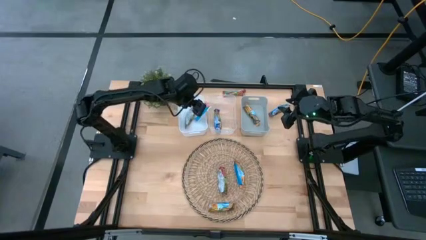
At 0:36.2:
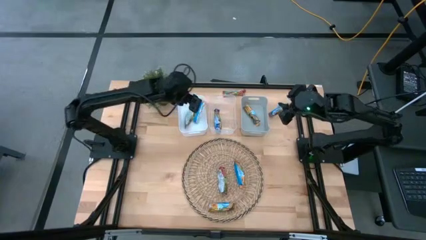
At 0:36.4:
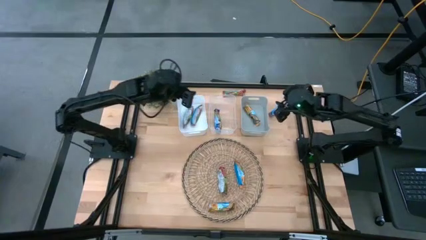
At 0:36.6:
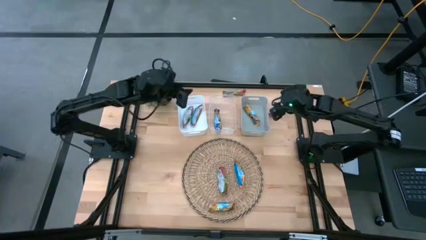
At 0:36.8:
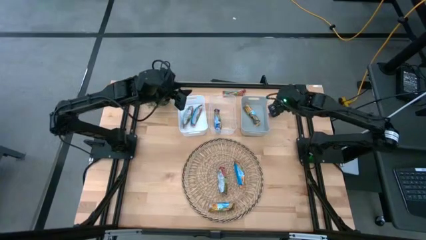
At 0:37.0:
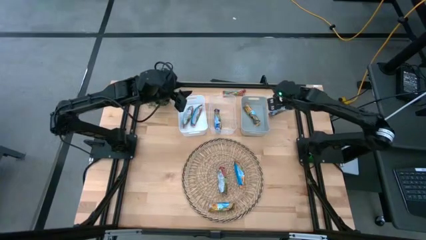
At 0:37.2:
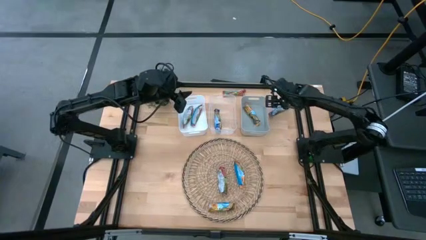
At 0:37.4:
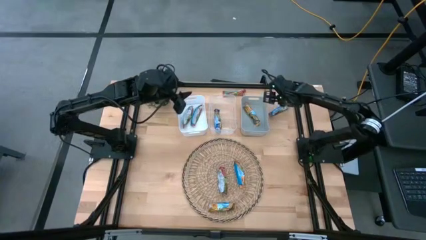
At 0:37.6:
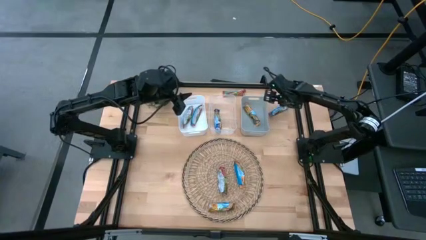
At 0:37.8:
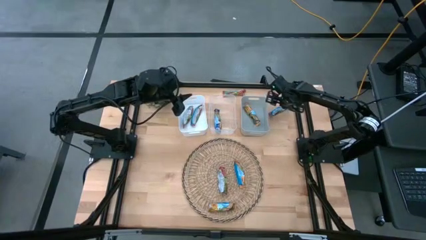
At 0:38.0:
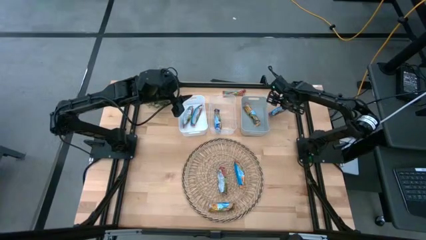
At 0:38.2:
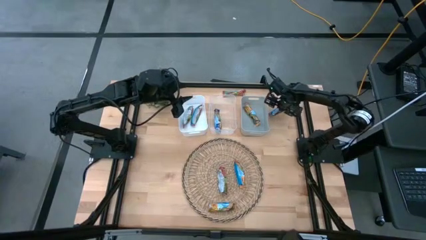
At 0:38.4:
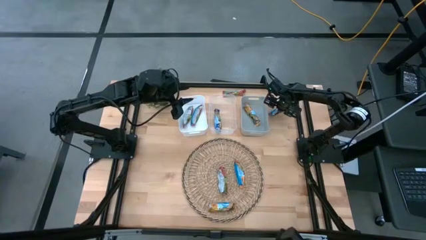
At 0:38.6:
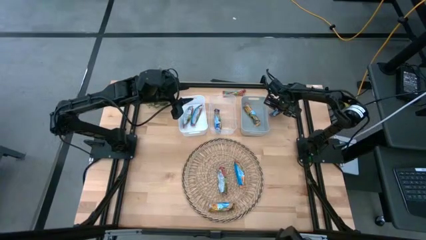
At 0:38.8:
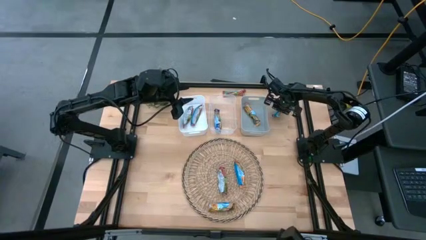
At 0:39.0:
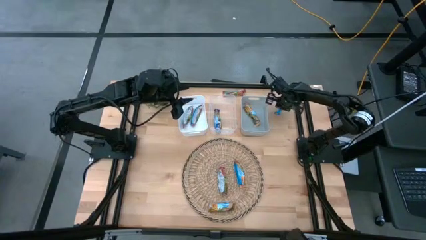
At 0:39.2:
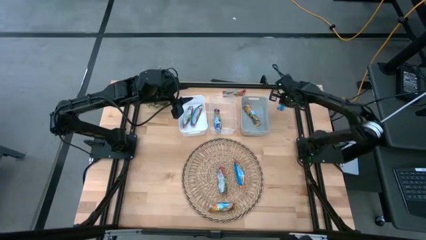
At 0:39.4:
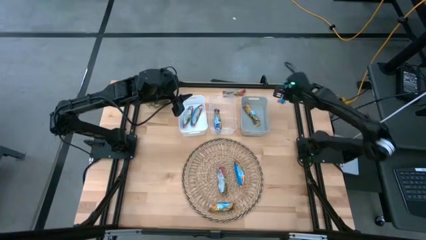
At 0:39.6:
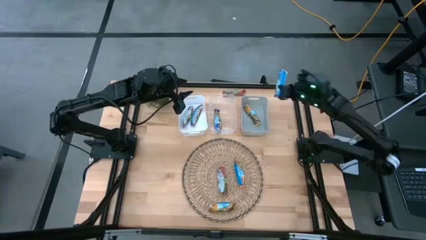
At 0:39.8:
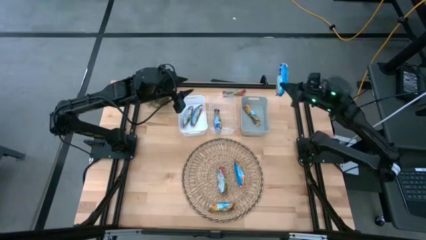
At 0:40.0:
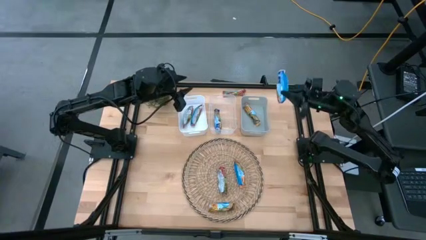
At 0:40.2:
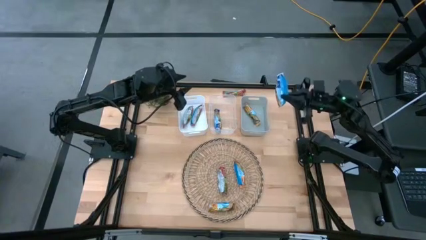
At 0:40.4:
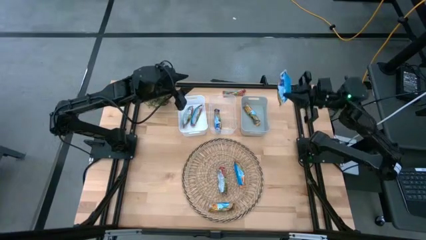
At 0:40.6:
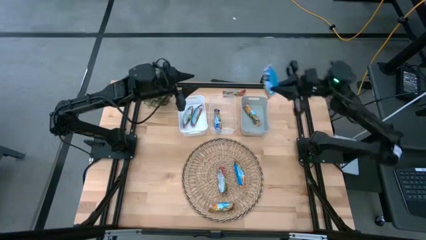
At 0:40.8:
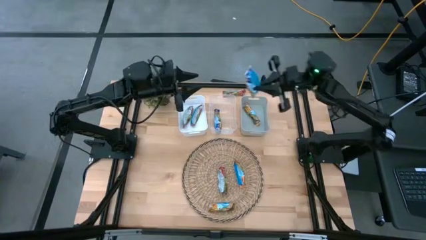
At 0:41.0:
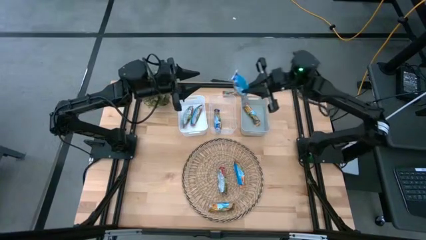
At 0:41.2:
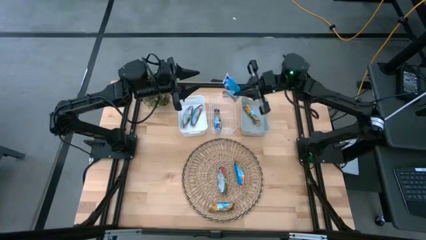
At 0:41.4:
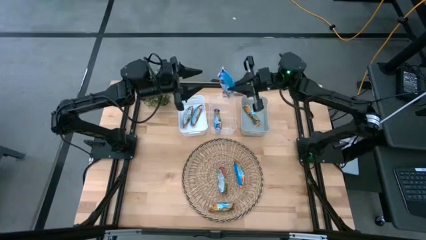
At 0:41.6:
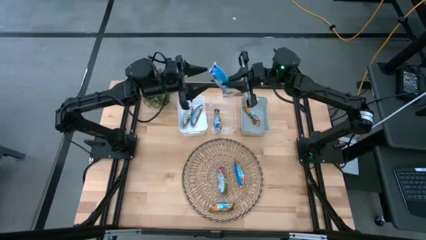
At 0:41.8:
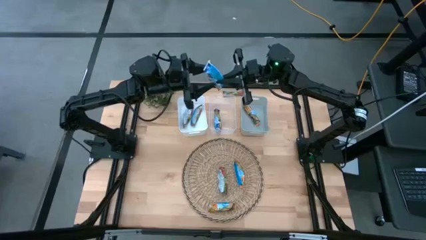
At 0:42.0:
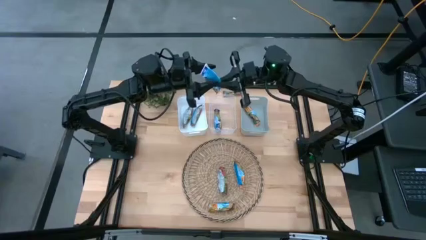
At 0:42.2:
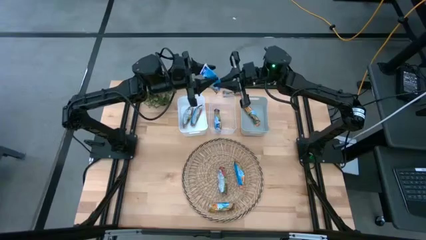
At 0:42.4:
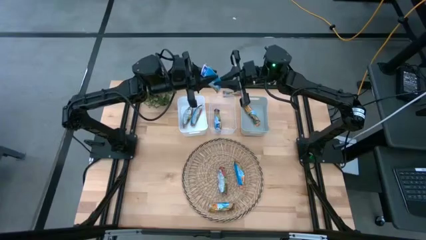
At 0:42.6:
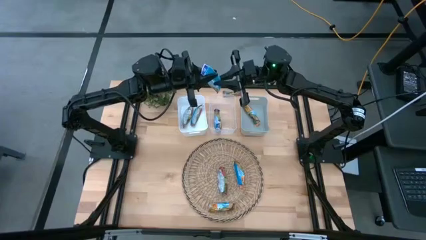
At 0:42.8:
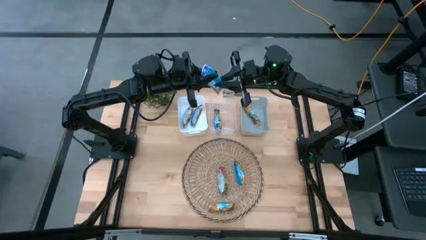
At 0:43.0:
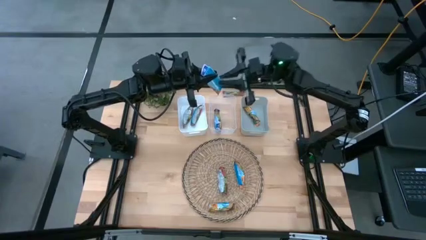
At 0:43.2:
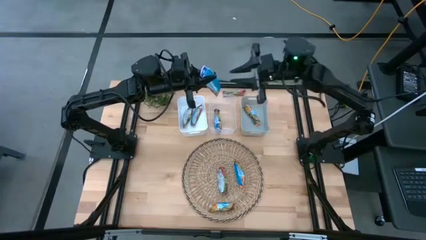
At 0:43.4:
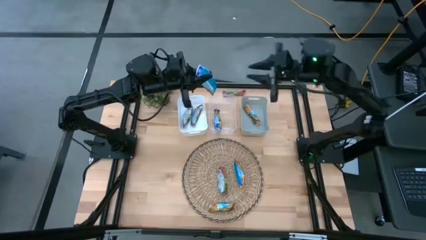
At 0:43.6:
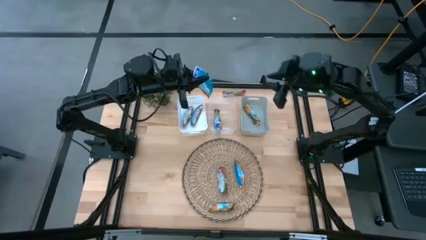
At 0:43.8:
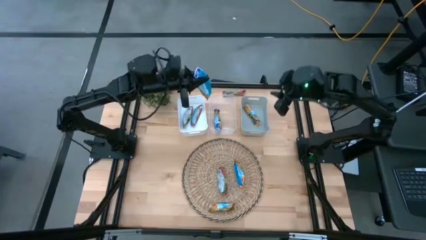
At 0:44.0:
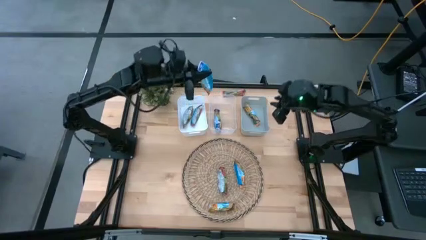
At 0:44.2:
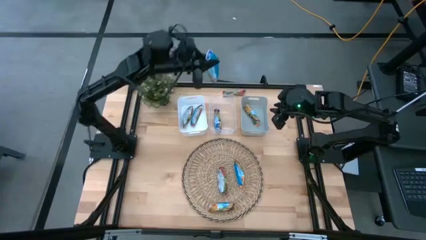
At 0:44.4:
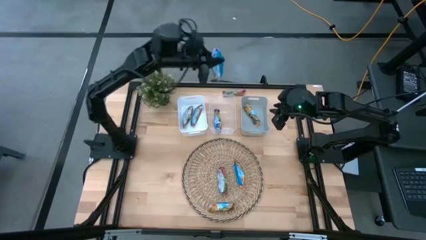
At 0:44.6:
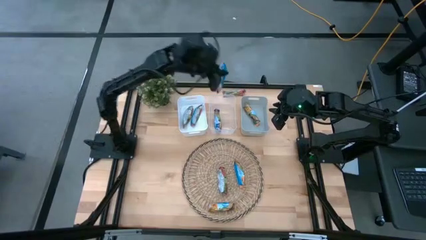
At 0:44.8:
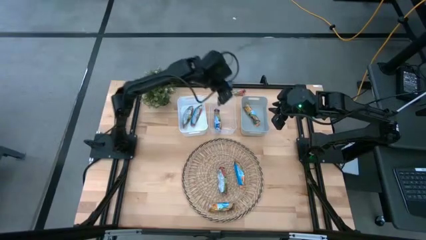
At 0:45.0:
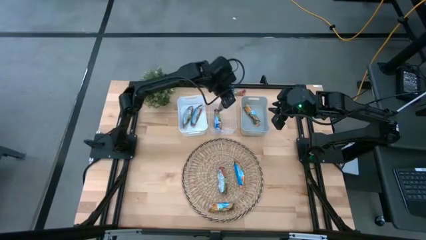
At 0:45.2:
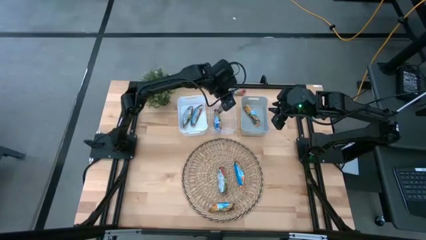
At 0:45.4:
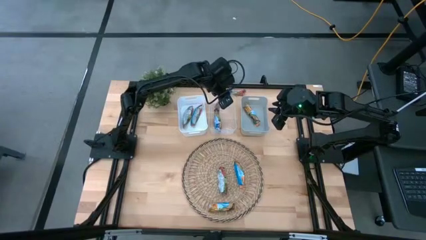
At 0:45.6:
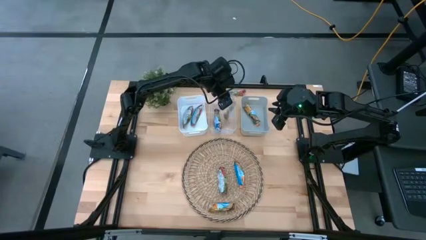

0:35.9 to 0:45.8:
Task: Pick and place Granola Bars by type
Put the blue granola bar into the transparent bin

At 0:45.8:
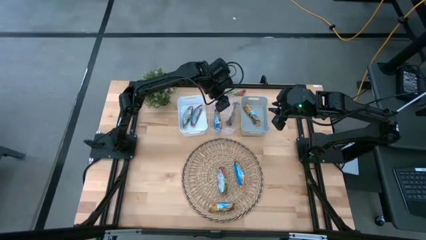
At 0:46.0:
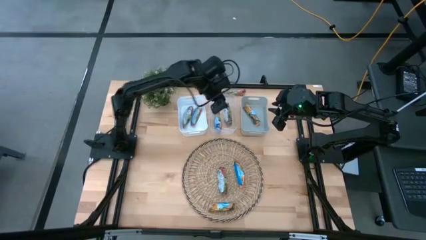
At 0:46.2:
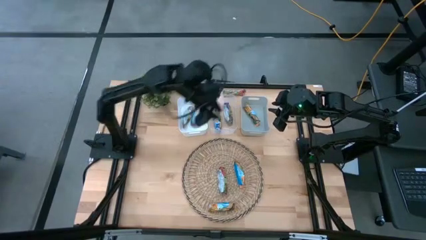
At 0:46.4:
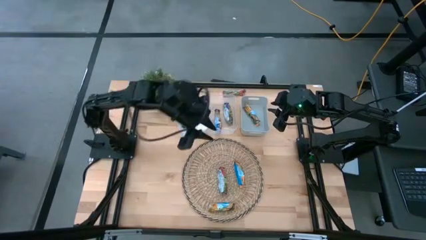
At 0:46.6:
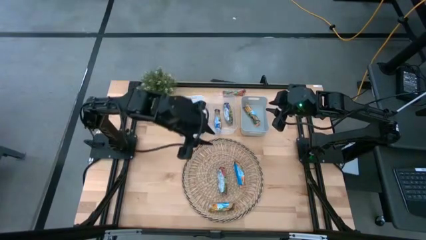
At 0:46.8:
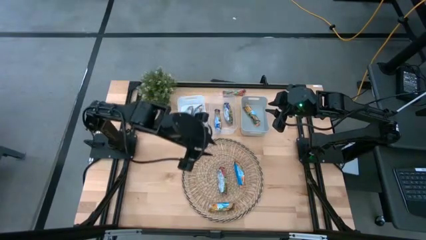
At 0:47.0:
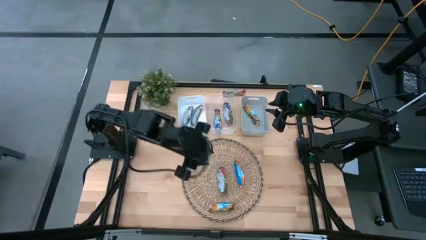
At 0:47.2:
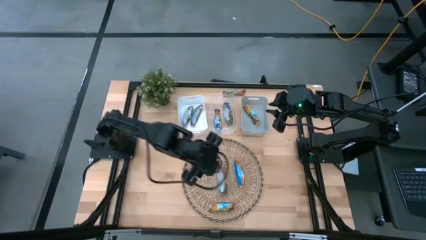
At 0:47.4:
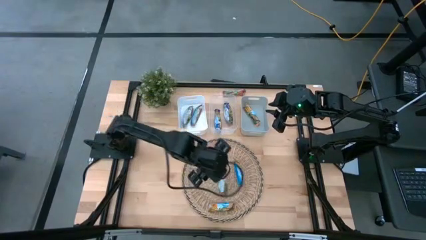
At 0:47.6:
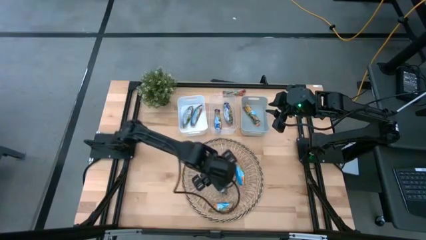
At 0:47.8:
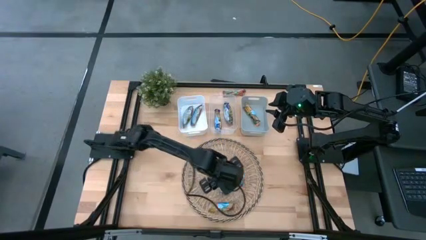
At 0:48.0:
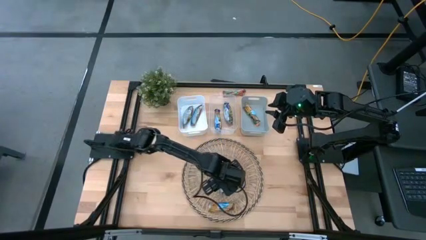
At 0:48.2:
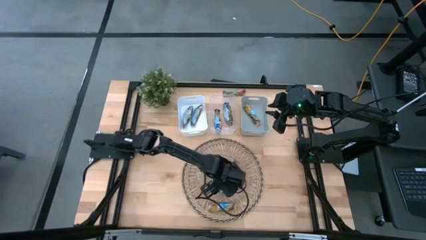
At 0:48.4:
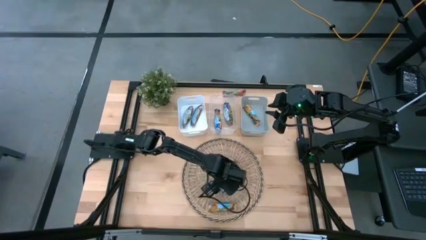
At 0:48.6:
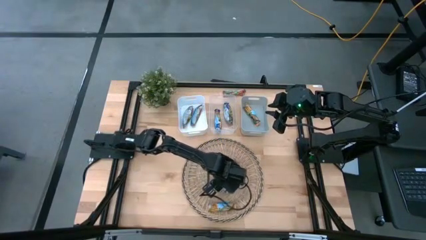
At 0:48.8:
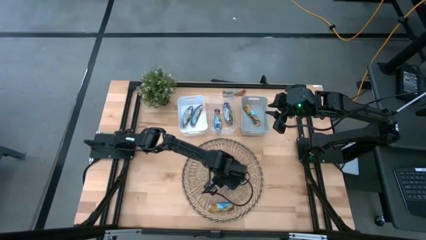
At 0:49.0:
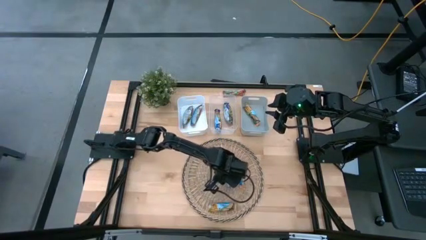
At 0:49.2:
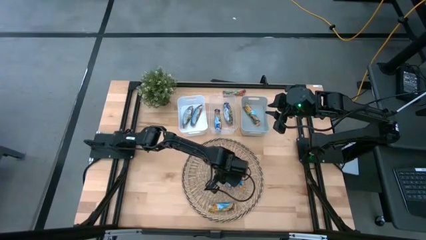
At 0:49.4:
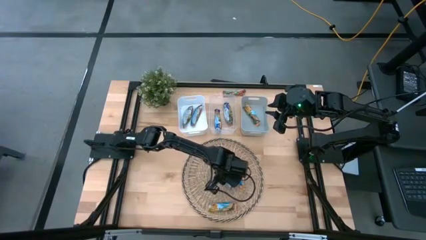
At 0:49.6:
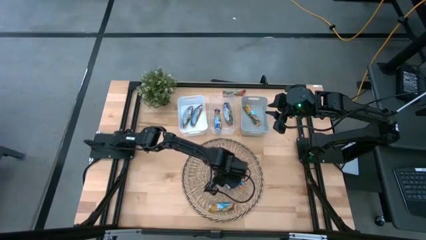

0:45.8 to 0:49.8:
Put the bottom red granola bar into the white bin

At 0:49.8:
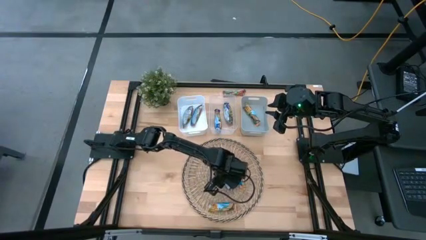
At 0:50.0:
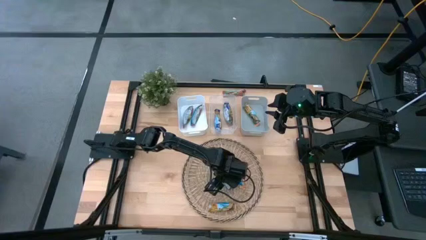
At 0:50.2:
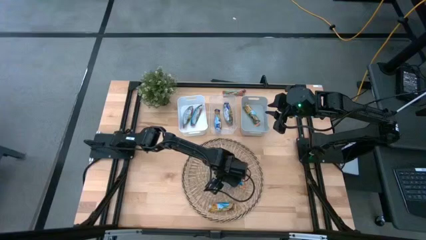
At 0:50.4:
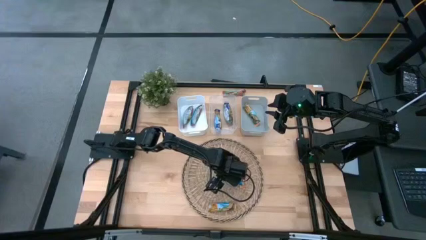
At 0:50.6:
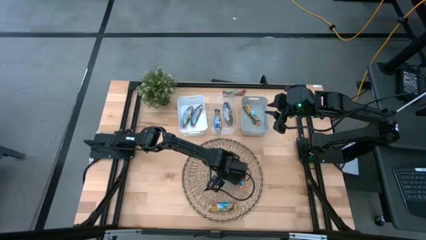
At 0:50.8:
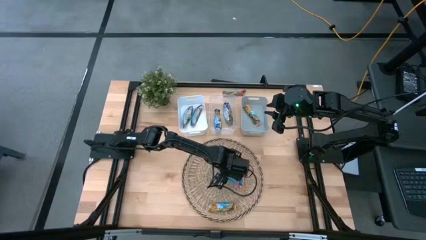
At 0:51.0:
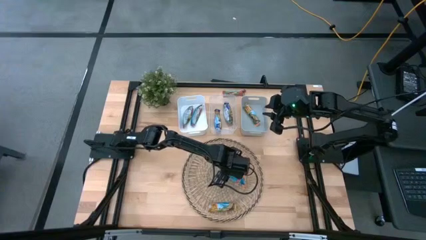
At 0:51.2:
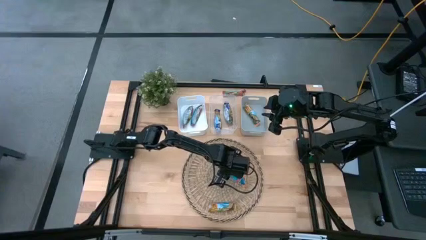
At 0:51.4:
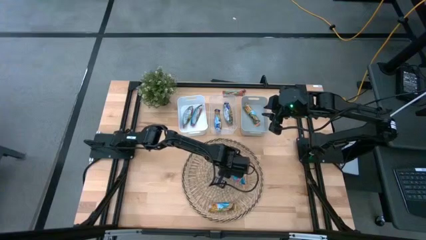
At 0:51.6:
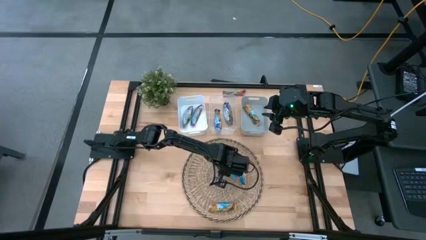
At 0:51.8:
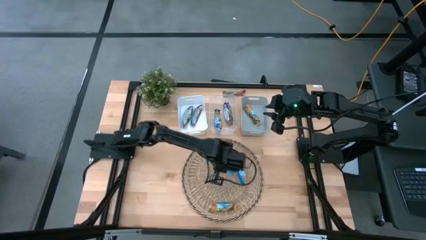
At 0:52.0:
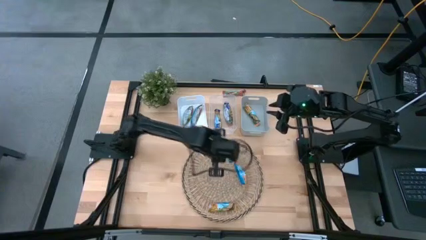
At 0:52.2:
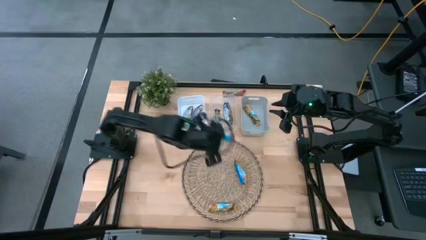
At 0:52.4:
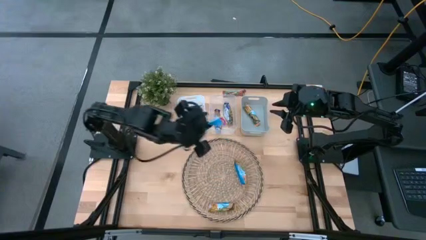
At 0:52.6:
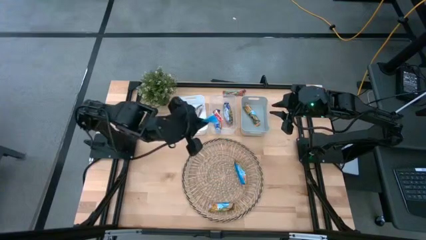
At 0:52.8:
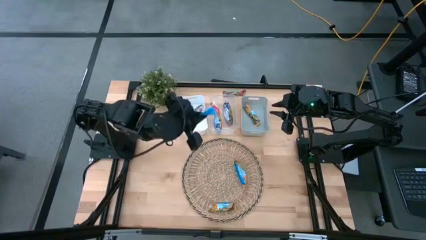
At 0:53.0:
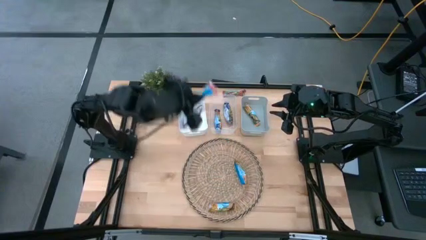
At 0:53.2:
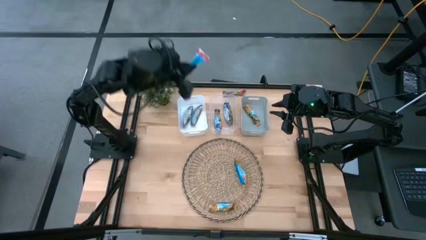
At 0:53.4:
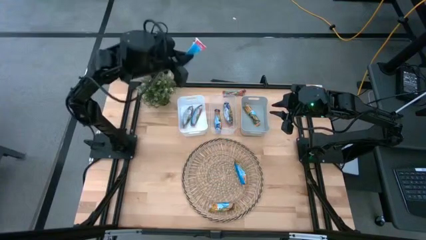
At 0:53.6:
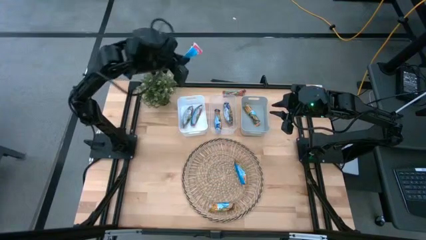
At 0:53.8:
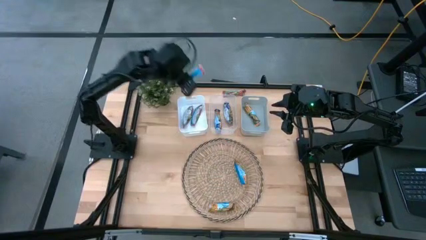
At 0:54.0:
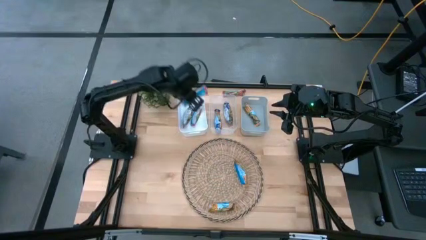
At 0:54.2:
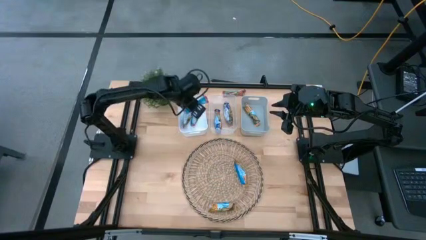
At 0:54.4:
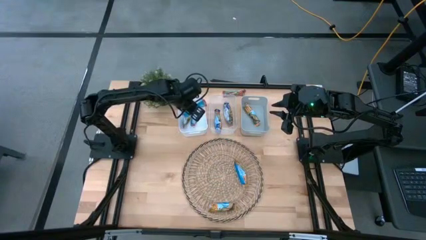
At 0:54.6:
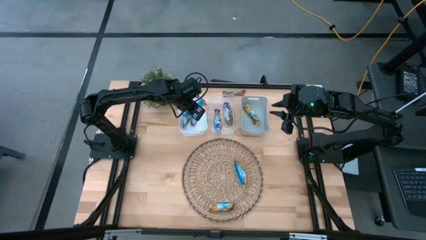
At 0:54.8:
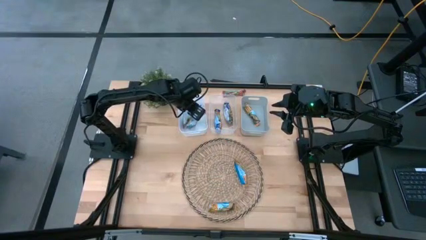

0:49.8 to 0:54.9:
Put the bottom red granola bar into the white bin
